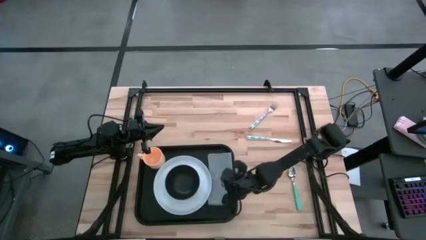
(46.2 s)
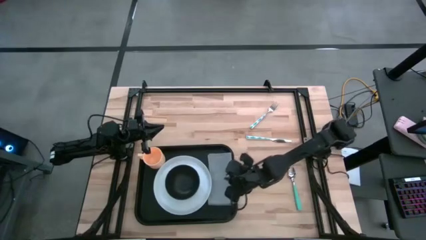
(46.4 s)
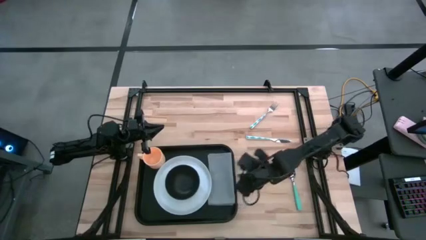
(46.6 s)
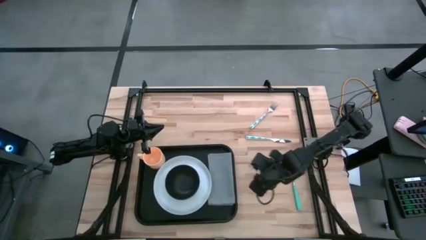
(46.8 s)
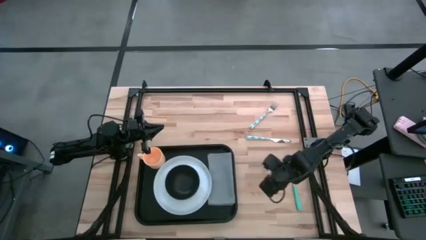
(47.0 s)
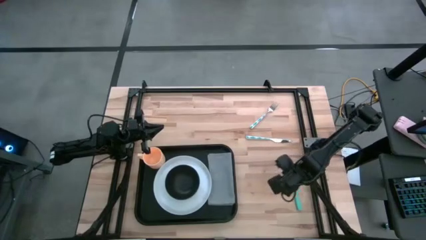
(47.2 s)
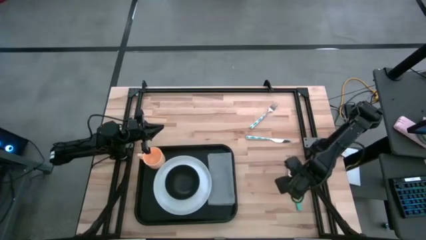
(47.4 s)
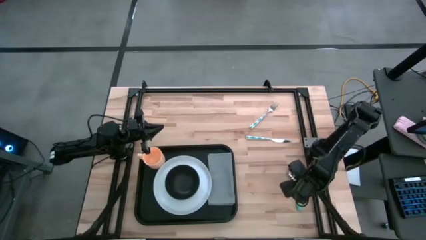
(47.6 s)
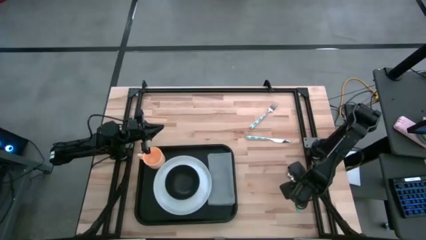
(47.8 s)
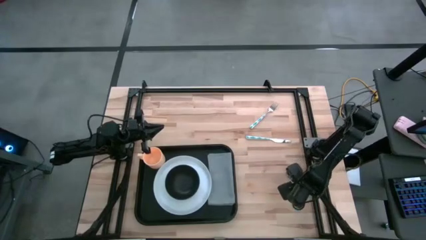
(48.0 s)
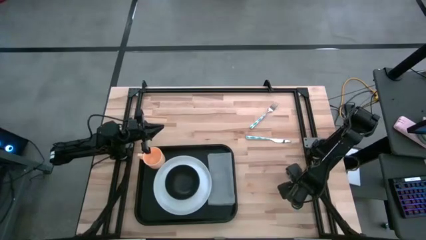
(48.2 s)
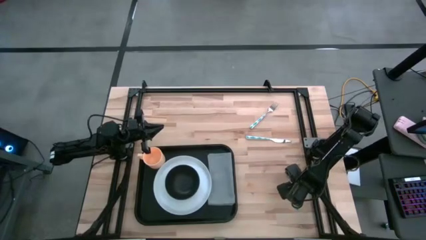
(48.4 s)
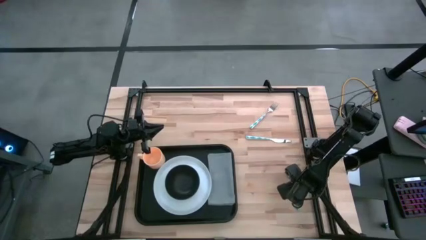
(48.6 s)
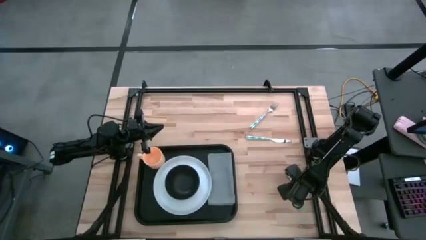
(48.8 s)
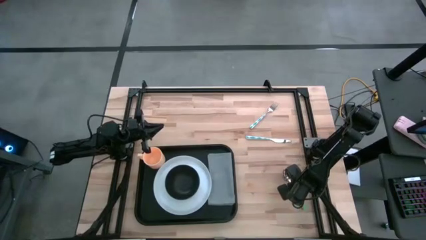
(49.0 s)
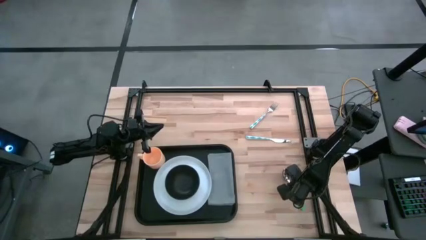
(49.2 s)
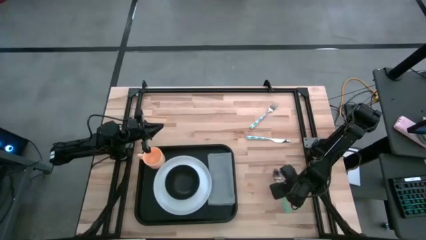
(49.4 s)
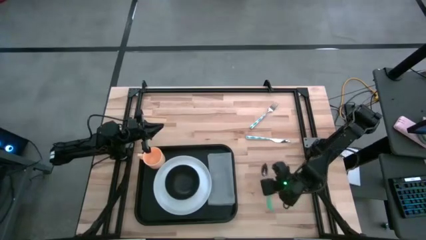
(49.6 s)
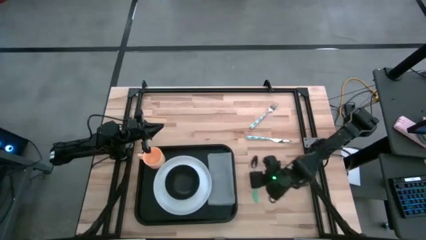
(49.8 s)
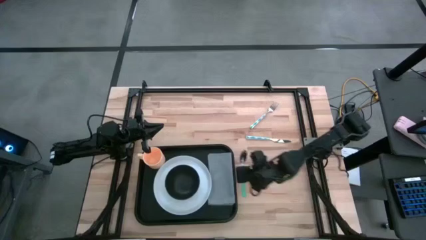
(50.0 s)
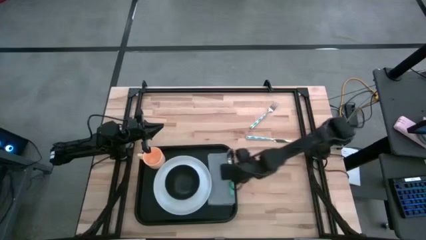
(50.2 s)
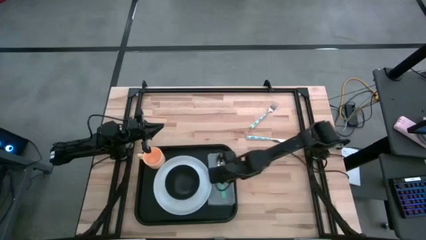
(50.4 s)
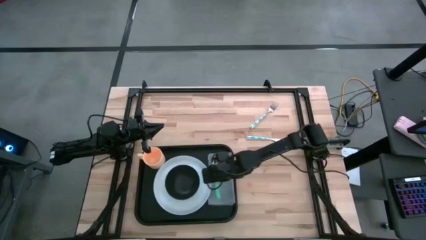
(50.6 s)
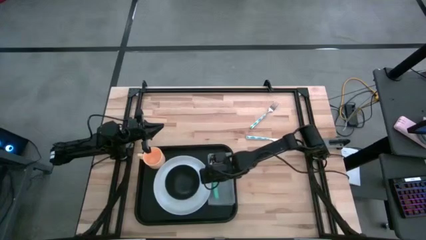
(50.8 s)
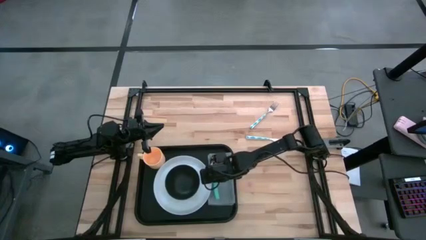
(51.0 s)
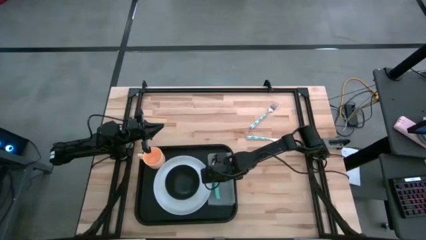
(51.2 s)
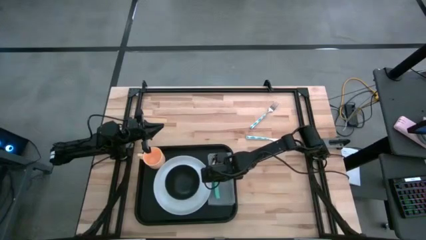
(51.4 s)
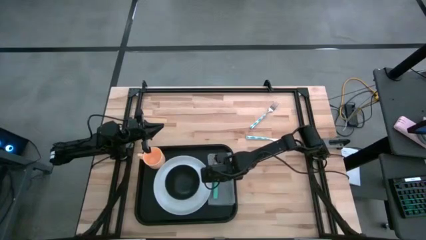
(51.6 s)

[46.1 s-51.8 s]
Task: Set up tray
Put the green spoon on top of the gray napkin

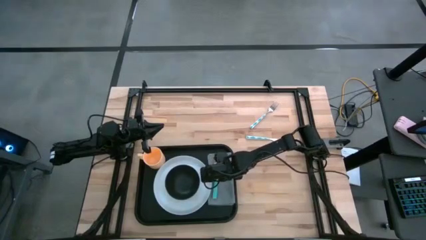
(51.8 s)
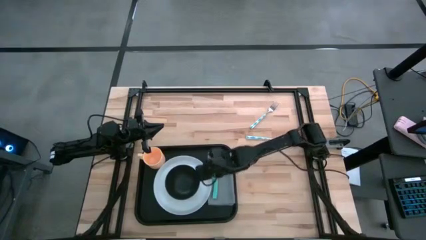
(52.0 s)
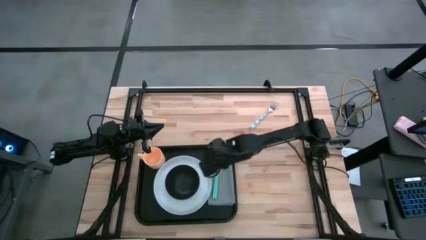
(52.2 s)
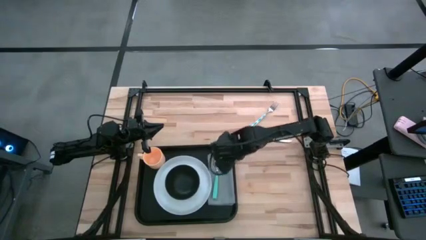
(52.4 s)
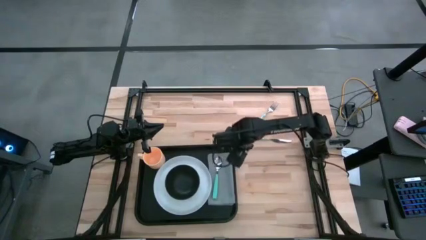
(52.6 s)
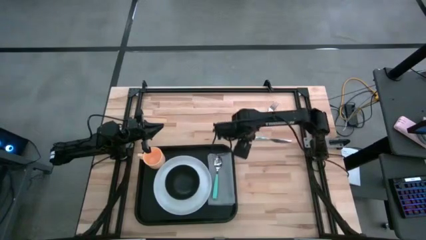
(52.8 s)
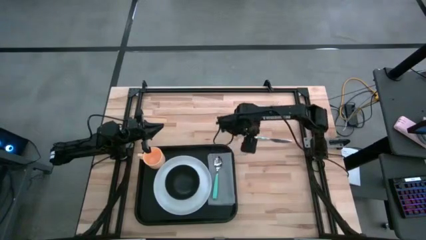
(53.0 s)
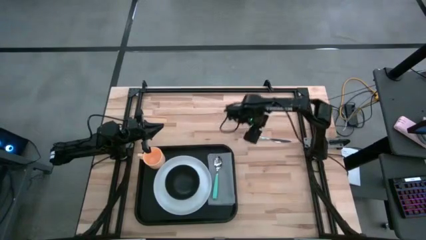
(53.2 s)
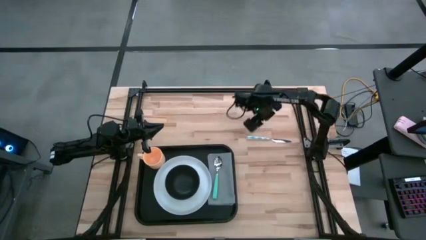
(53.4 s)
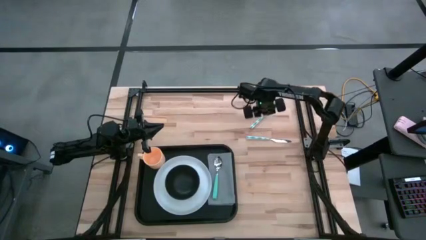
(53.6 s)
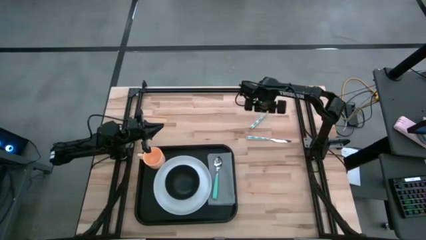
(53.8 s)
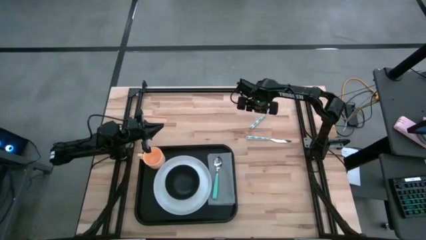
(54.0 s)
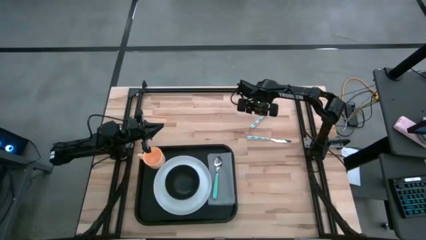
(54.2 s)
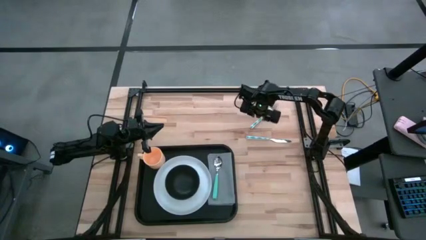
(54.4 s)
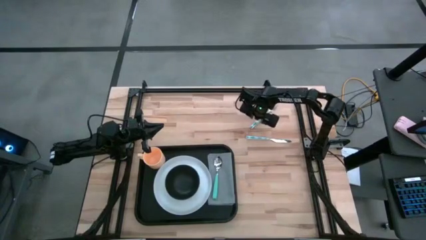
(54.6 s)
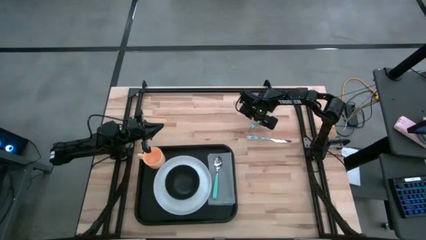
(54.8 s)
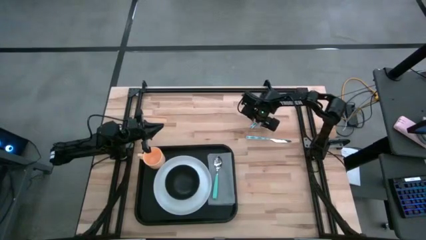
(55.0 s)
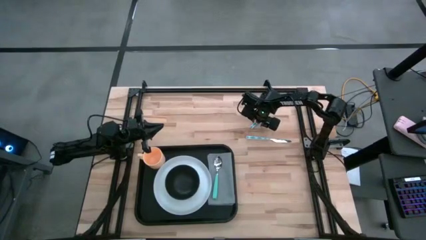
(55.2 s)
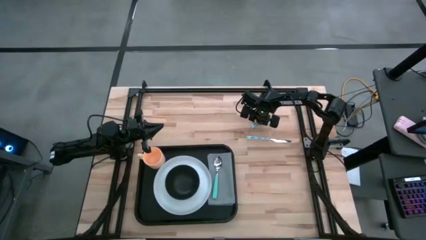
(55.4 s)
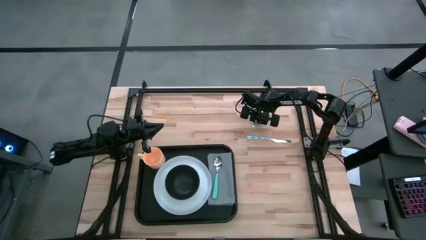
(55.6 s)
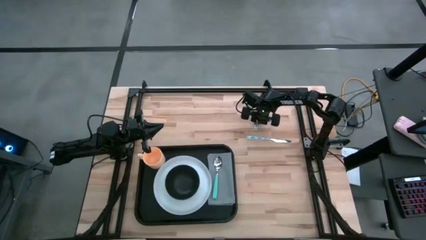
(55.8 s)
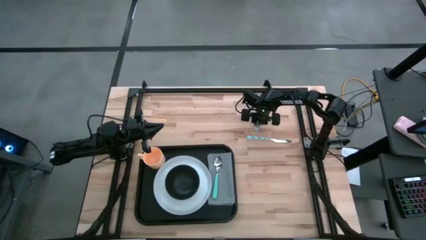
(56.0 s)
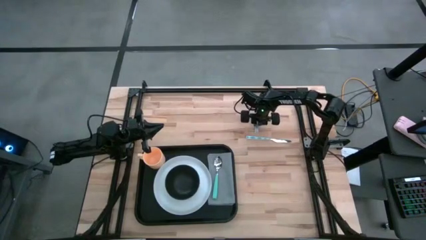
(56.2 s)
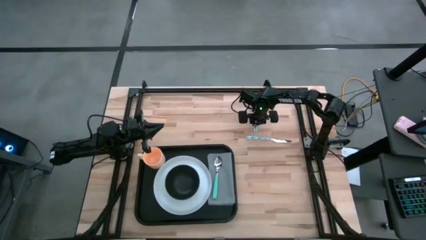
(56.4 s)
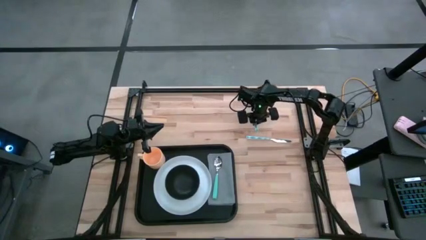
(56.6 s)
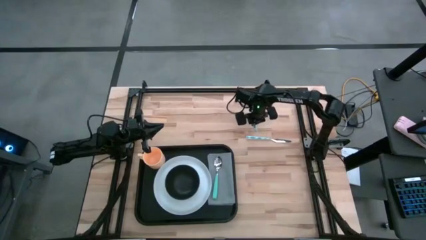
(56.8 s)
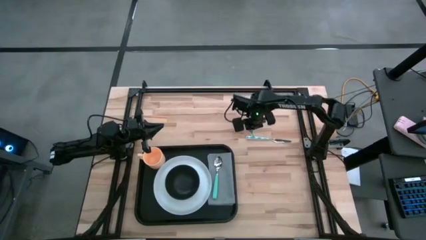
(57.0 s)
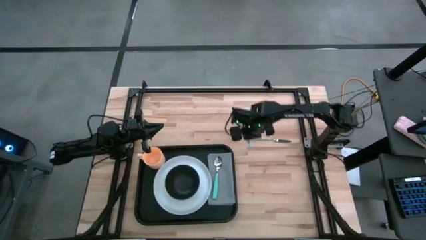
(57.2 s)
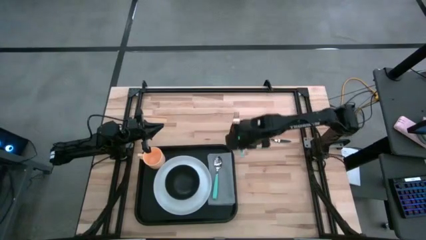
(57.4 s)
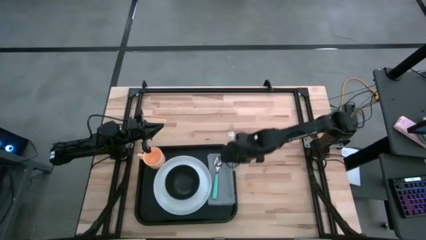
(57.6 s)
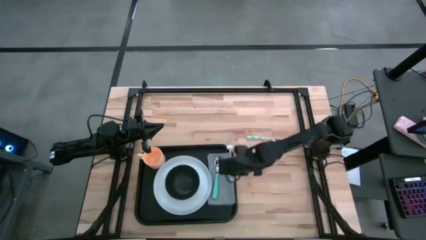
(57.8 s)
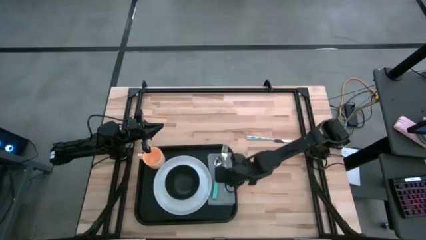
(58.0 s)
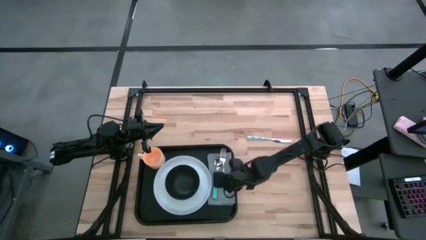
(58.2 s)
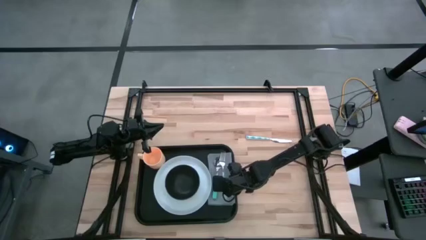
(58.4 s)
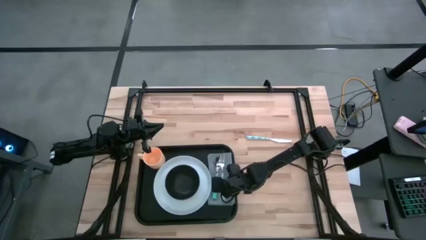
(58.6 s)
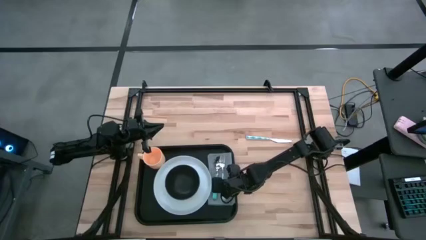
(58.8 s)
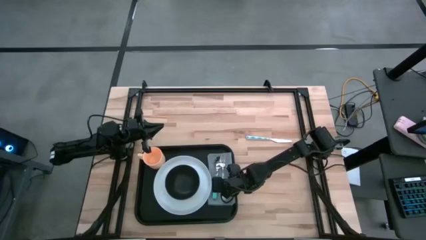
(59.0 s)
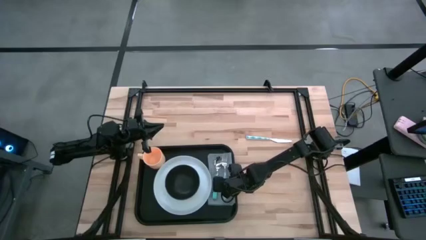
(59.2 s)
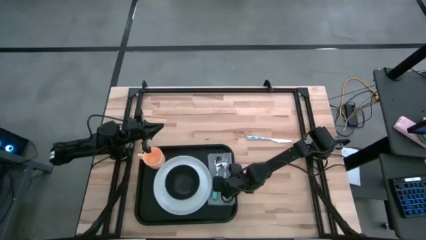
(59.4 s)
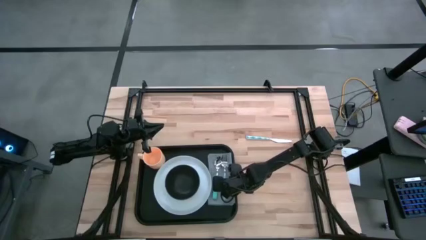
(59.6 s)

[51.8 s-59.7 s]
Put the white and green fork on the gray napkin to the right of the green spoon

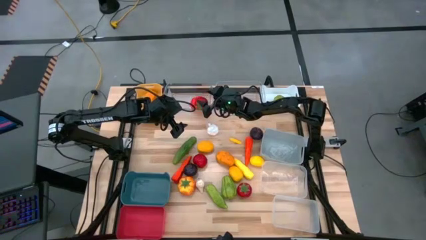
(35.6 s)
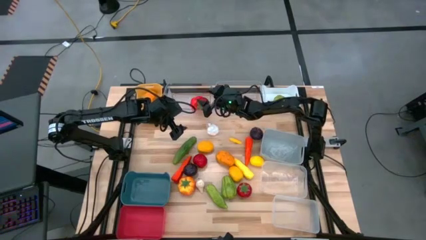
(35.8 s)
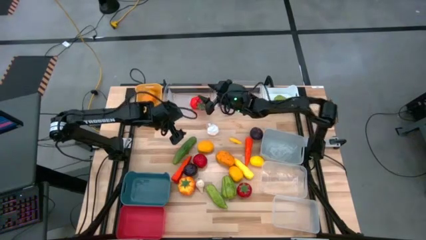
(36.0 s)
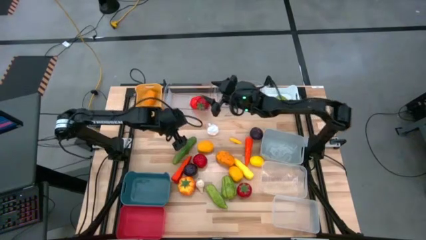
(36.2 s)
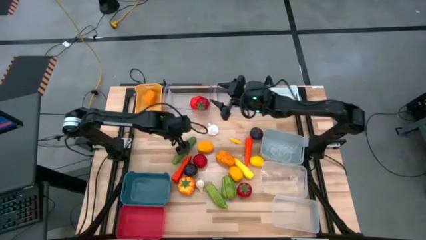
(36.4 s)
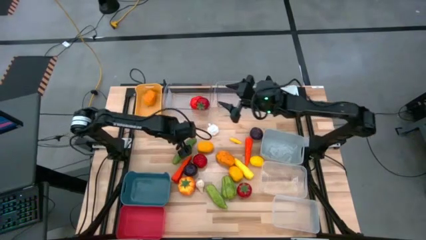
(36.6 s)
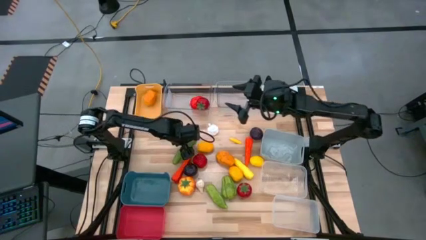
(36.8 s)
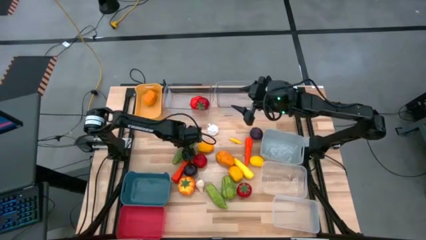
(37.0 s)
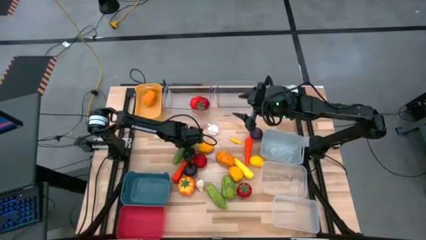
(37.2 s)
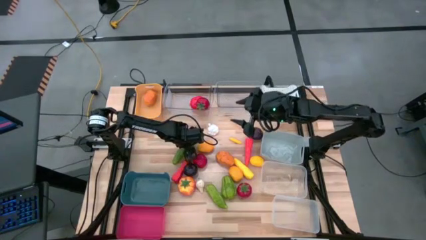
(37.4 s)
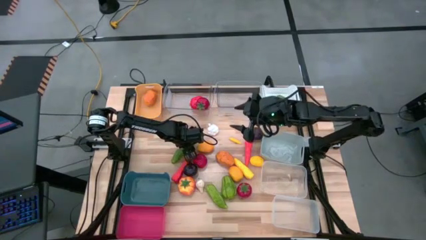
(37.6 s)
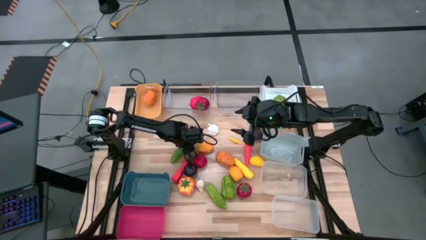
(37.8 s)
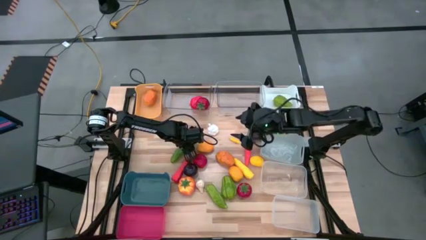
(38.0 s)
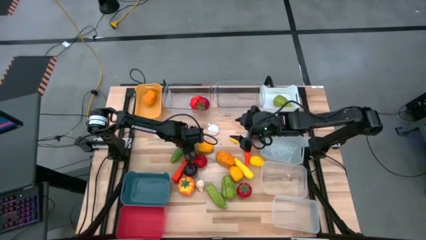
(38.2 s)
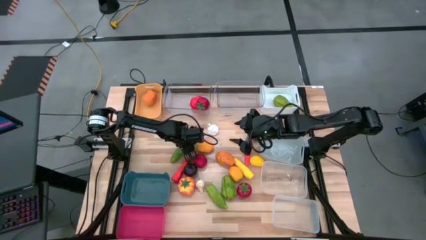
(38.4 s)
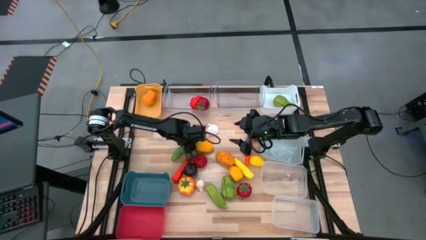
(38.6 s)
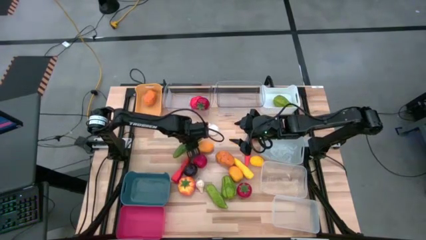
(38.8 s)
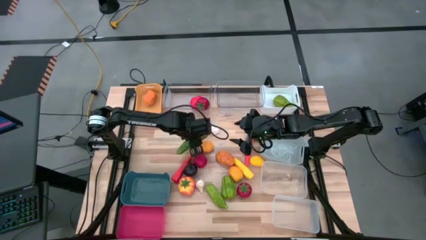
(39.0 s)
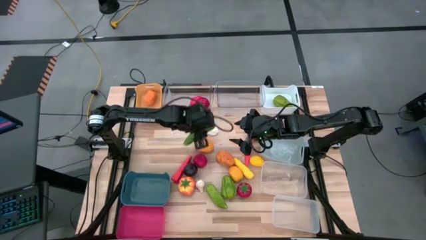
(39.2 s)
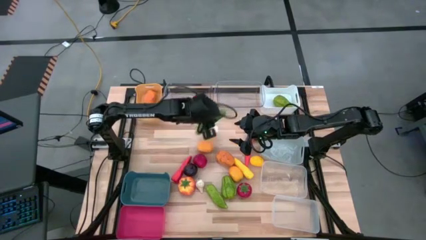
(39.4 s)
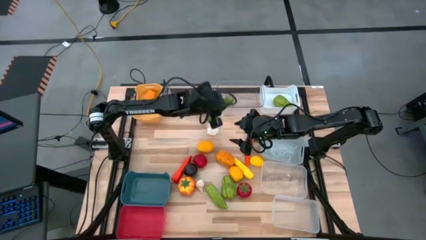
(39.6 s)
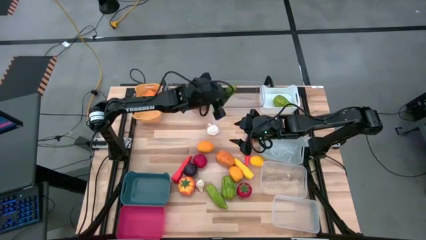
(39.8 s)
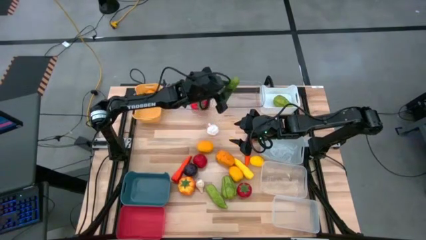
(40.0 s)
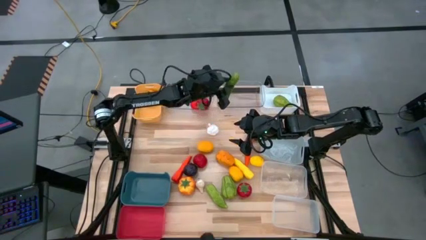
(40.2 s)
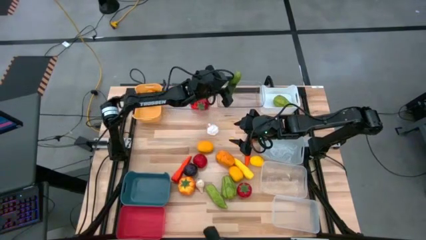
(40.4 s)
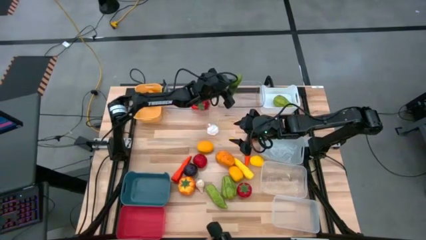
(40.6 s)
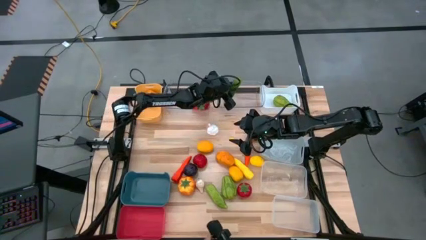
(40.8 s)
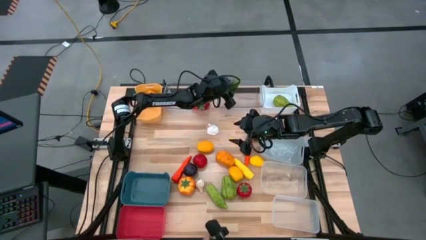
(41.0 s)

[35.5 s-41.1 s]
Task: Sort produce into baskets
Put the green cucumber into the right transparent bin
